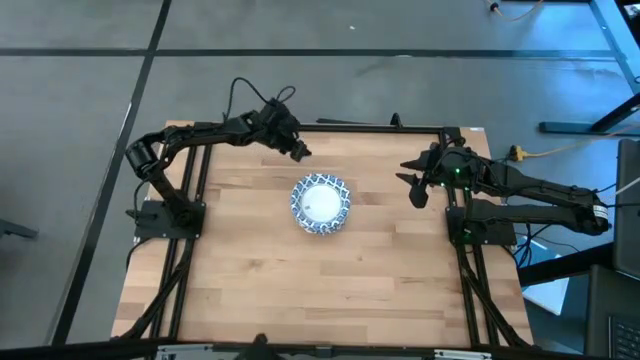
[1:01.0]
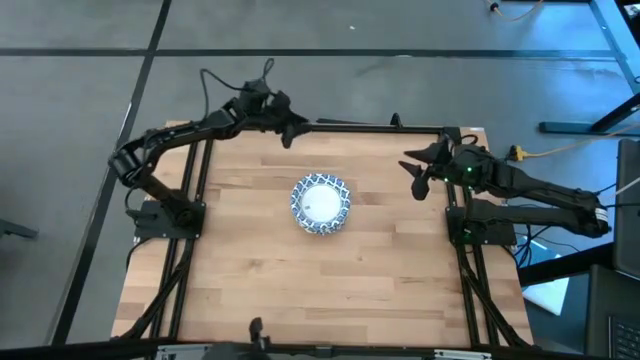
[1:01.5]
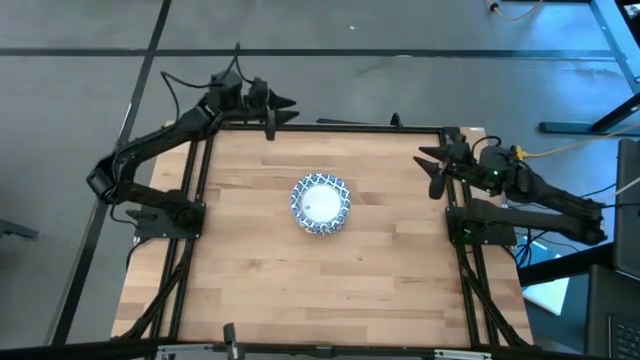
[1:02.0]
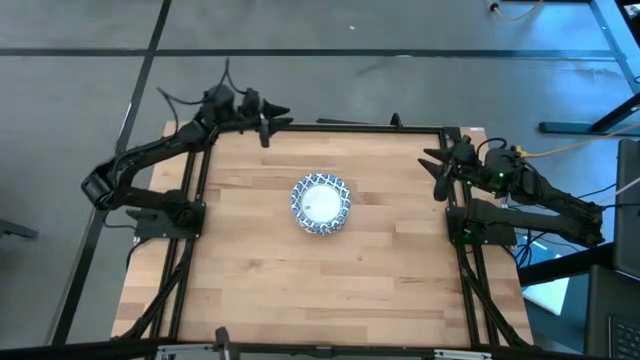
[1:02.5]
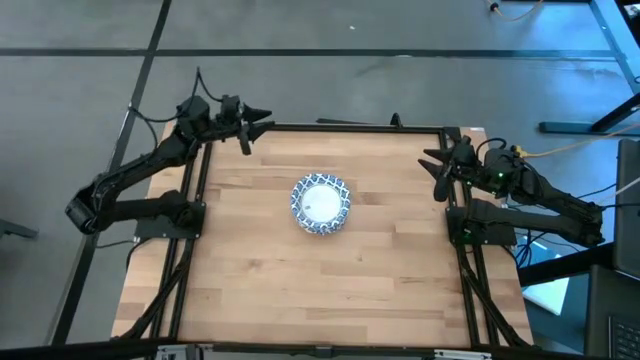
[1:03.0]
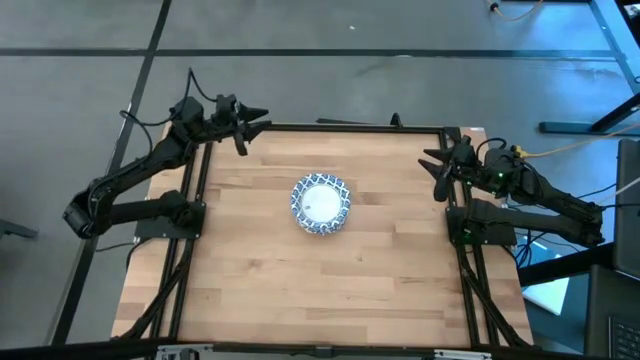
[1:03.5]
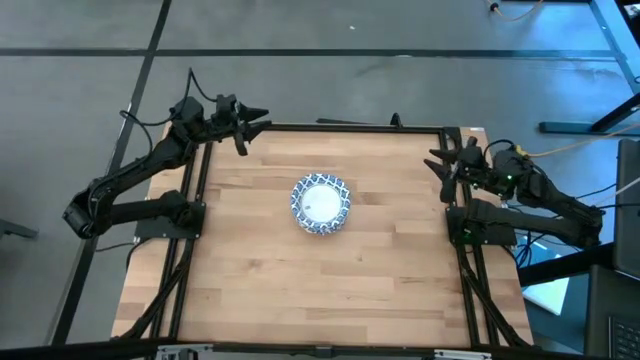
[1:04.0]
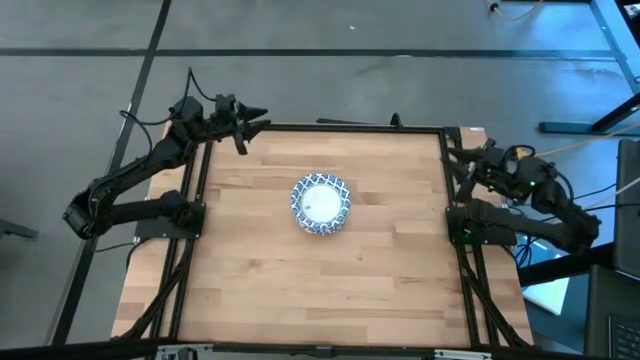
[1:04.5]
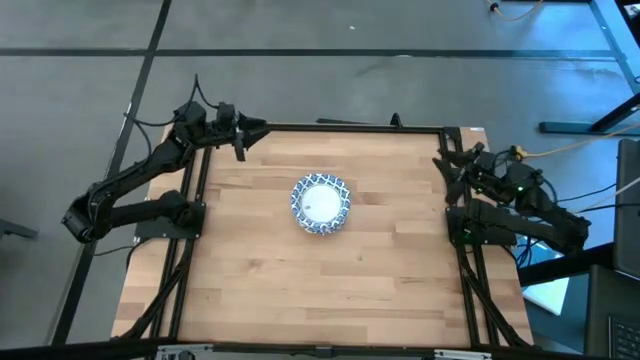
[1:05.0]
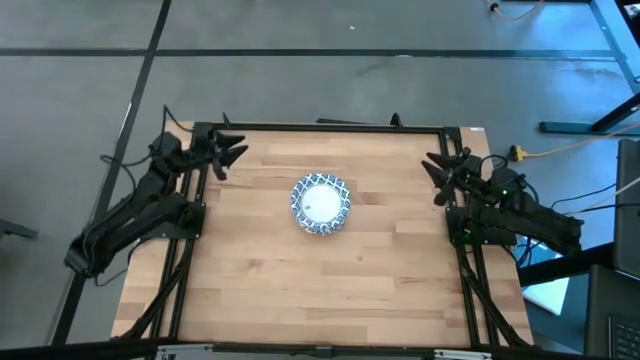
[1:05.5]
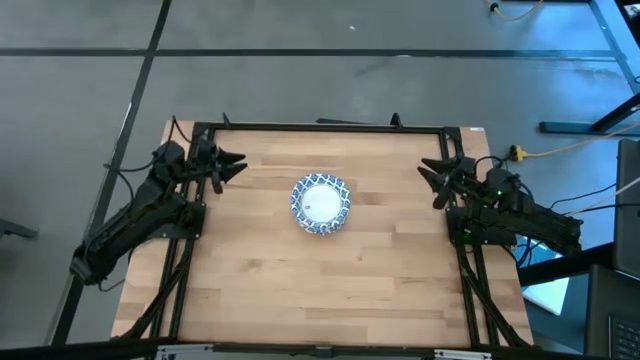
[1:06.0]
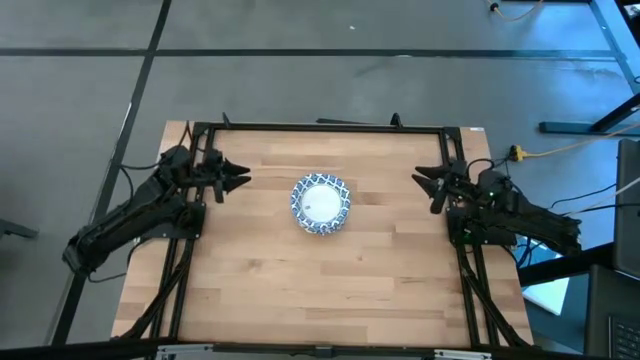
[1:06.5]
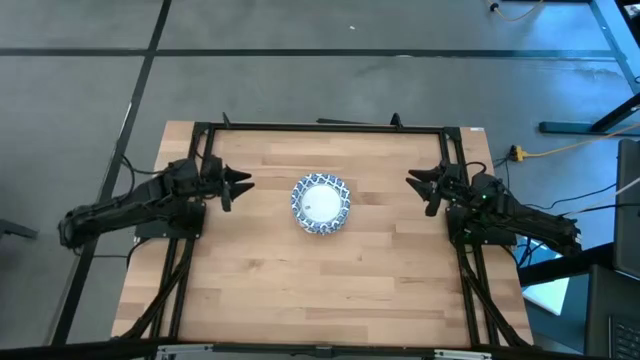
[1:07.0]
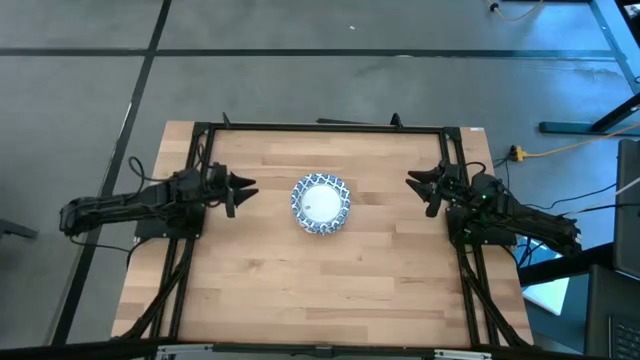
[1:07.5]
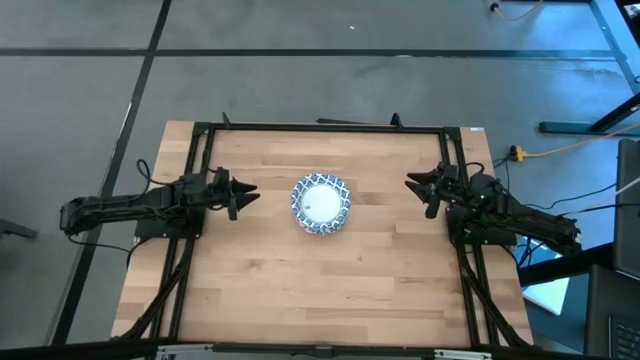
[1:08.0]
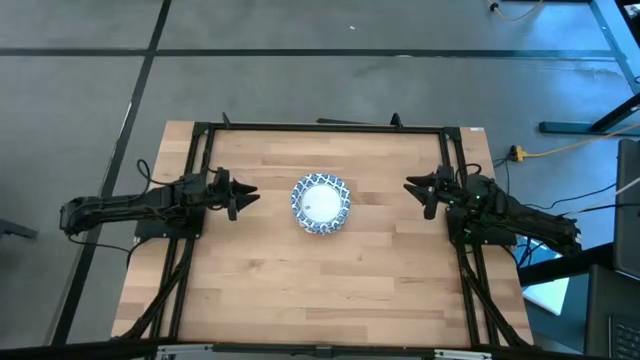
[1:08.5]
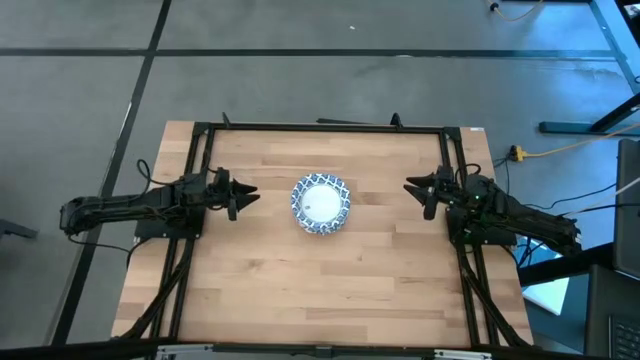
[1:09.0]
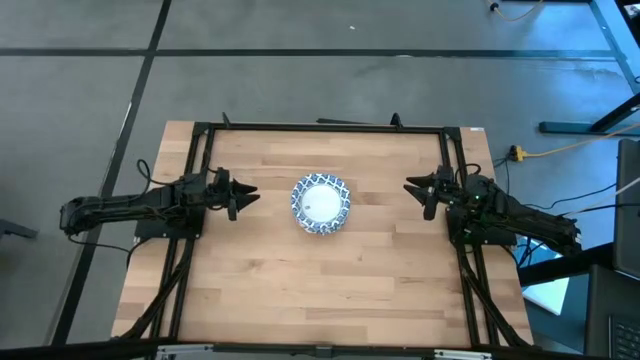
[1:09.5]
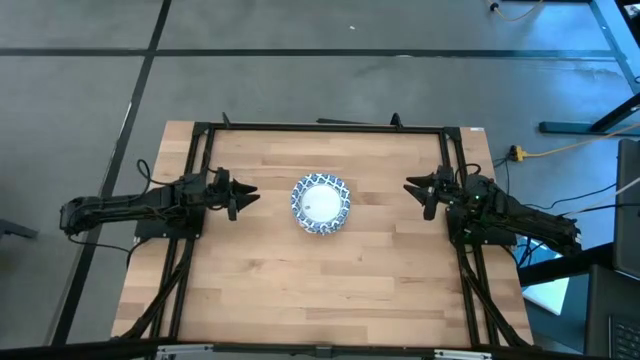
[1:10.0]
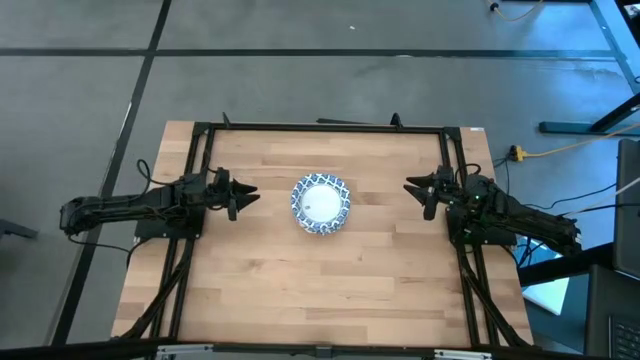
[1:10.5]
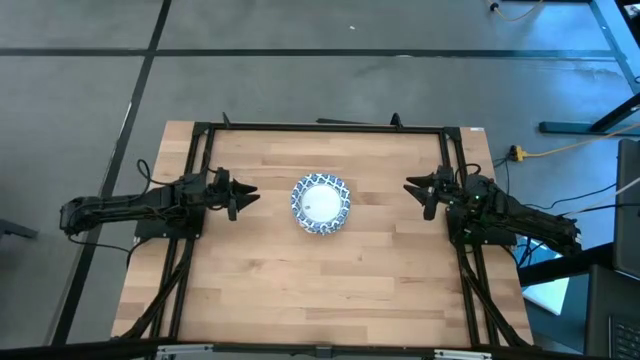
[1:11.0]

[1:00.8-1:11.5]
Task: Nest bowls inside each other
Return to Home Position

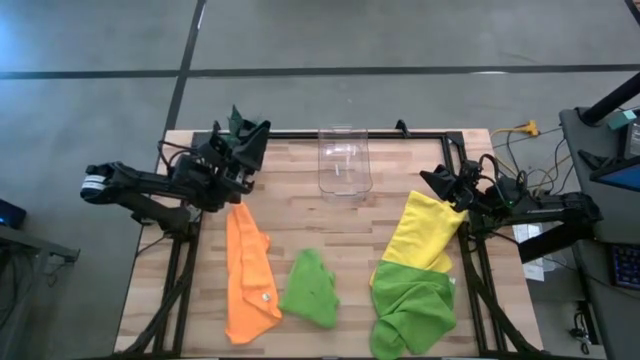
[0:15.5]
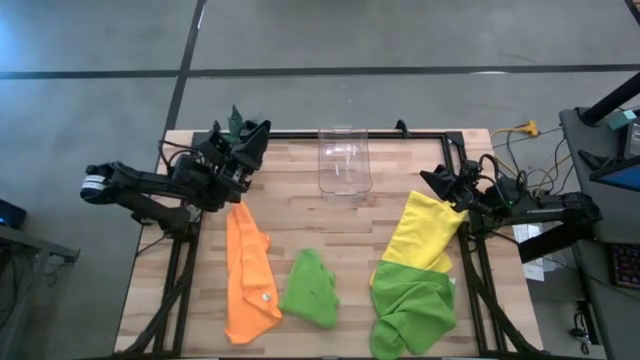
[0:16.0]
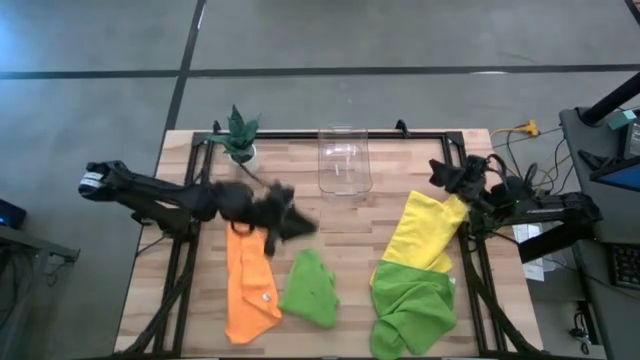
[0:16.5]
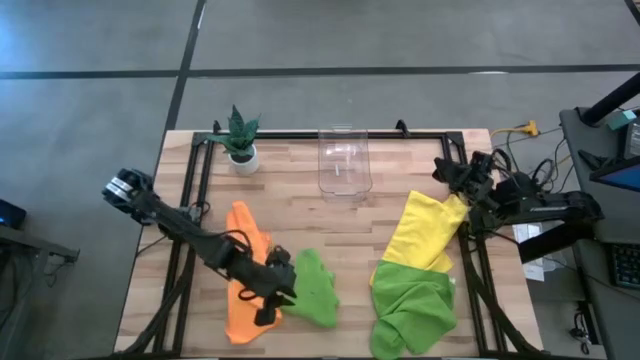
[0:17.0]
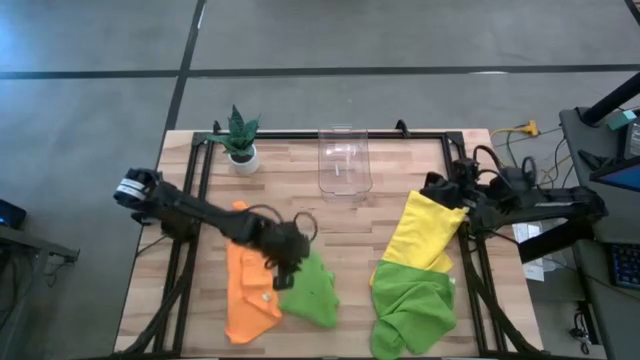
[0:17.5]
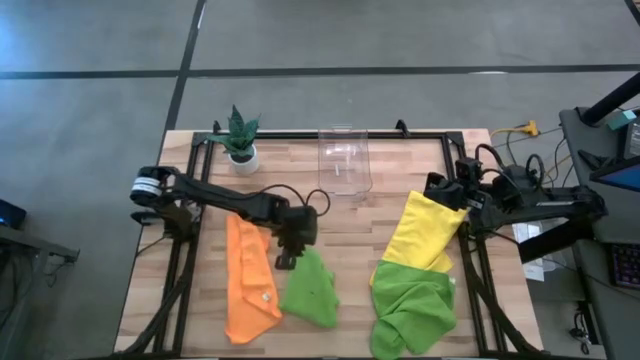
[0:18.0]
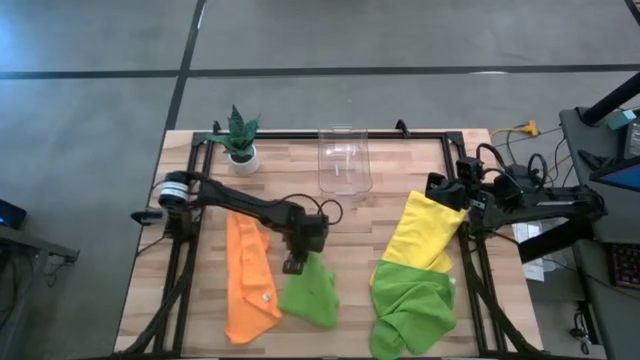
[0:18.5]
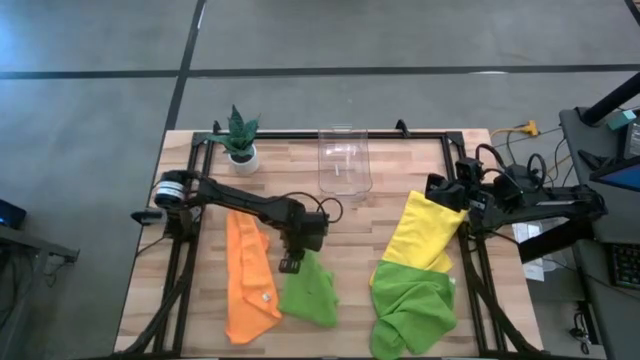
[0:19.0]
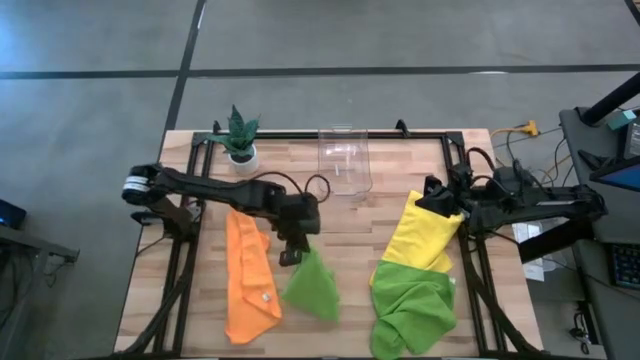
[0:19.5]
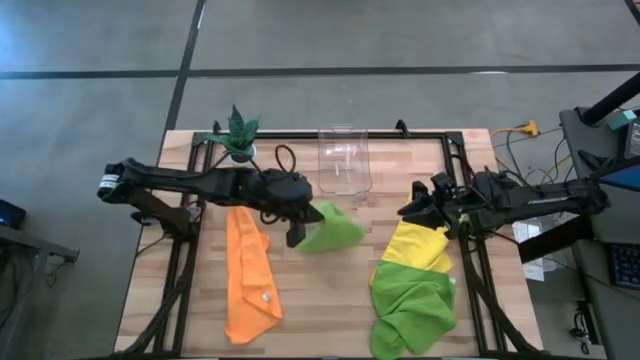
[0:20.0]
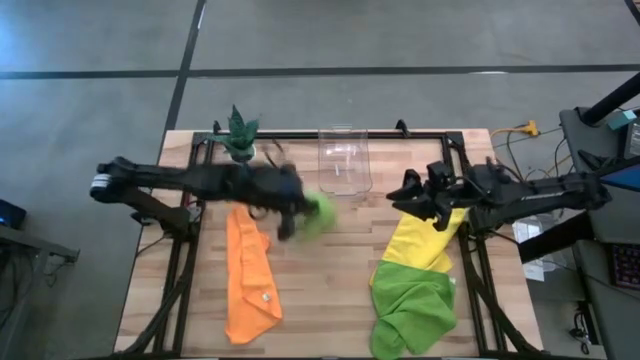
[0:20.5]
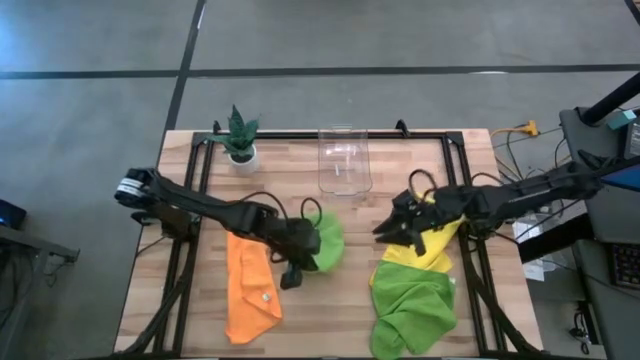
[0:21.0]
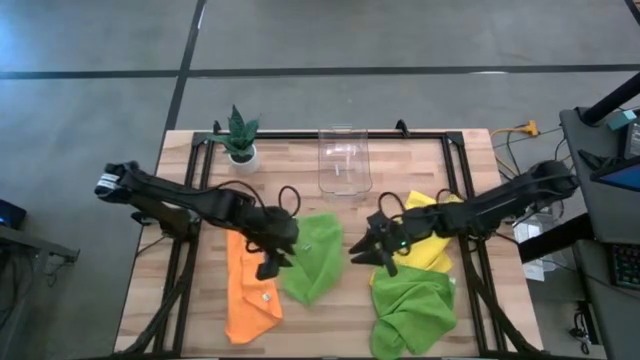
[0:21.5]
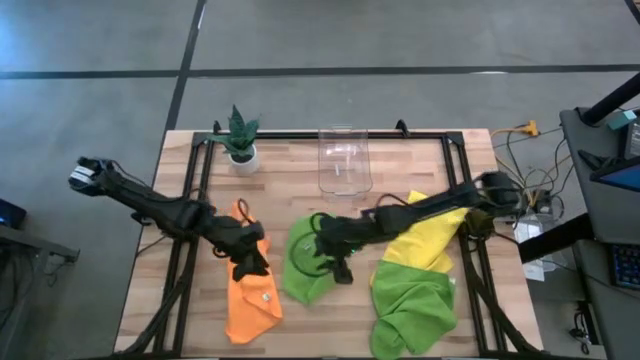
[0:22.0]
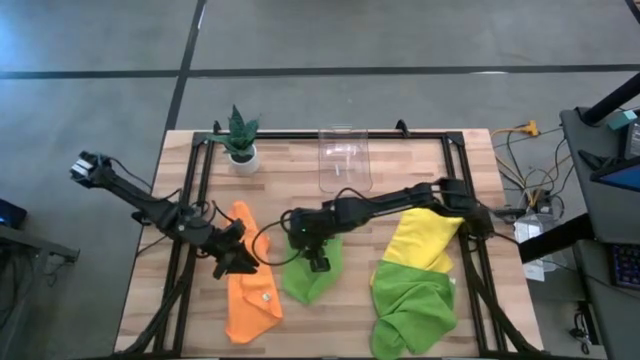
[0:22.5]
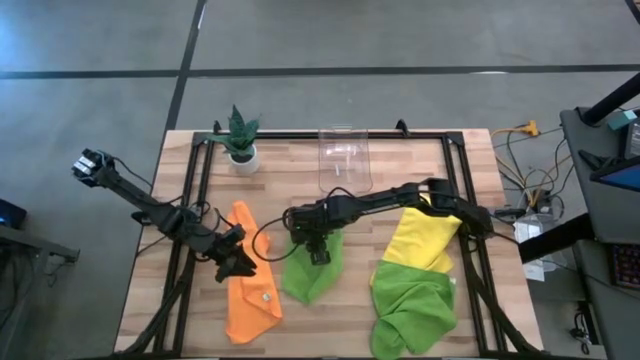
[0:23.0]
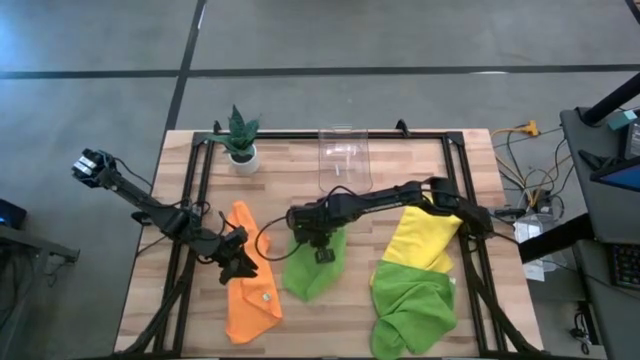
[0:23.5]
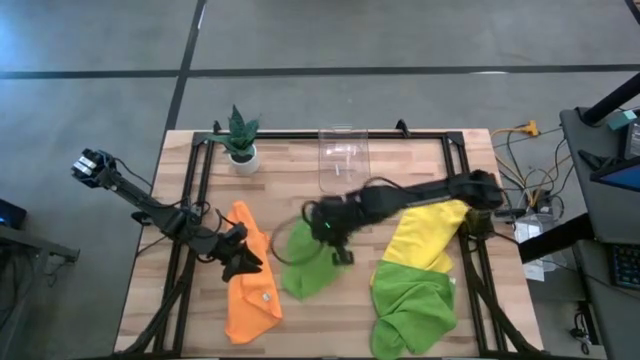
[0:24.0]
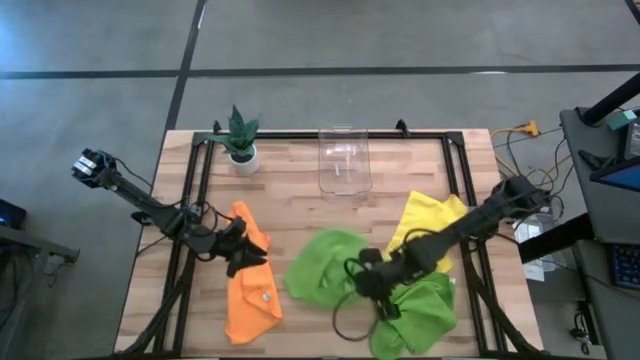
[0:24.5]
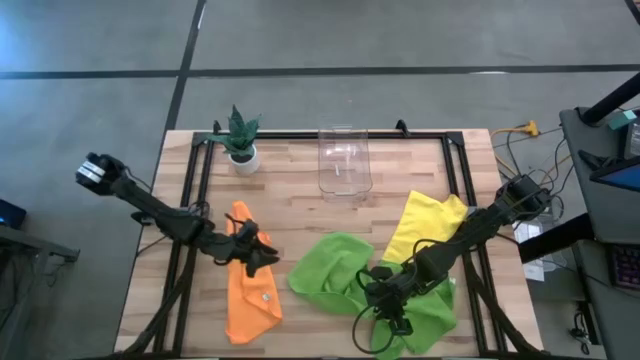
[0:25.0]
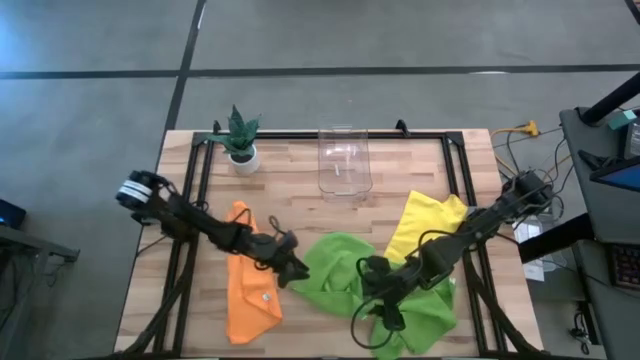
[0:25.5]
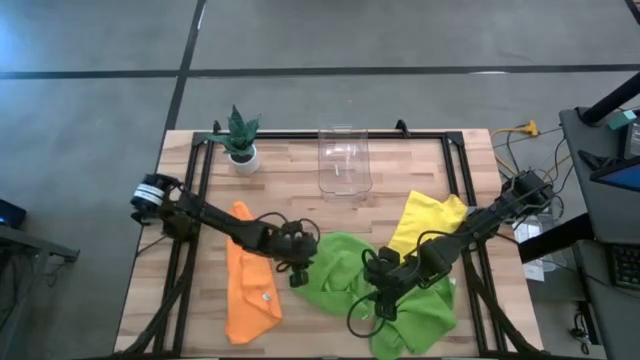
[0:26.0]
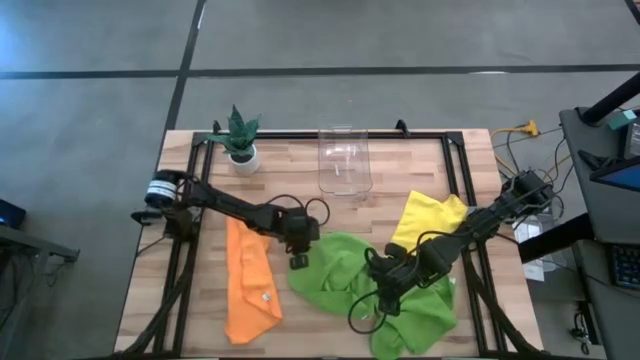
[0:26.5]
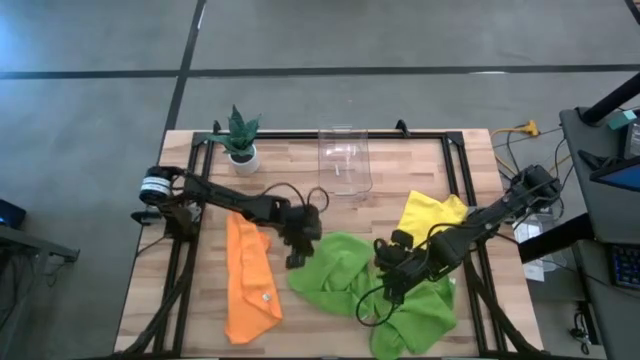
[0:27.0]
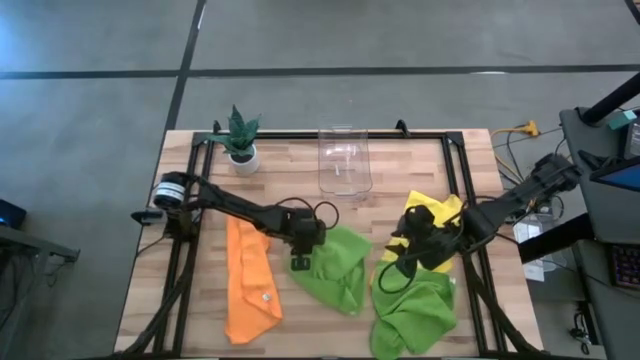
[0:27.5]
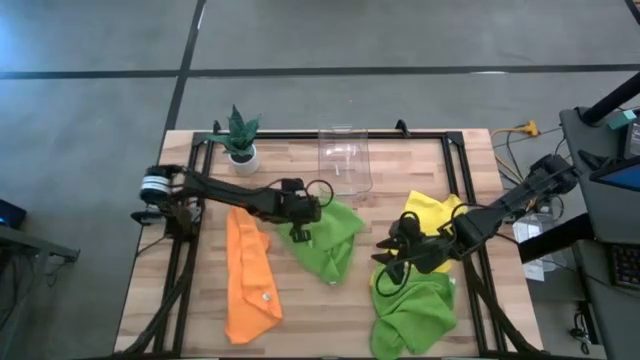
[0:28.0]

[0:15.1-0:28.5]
Task: Fold microfiber towels
Move the top green towel to the center
